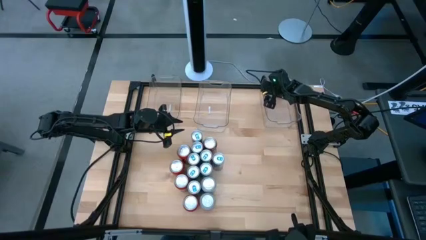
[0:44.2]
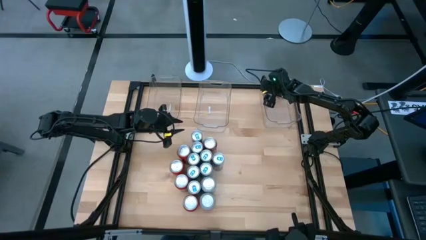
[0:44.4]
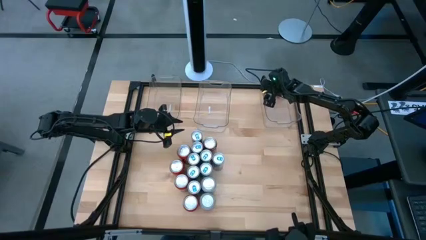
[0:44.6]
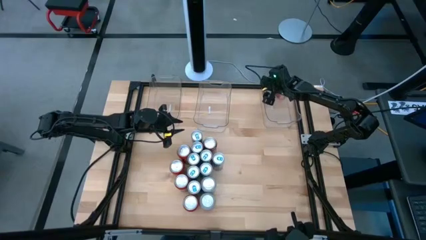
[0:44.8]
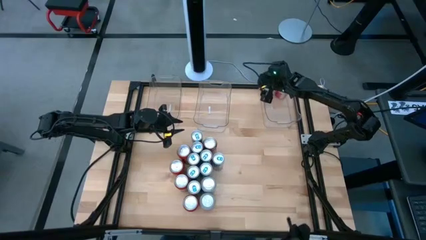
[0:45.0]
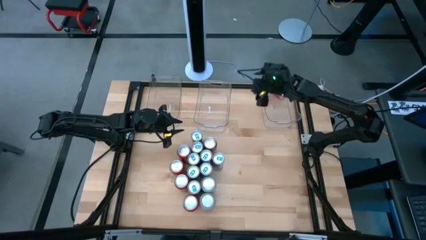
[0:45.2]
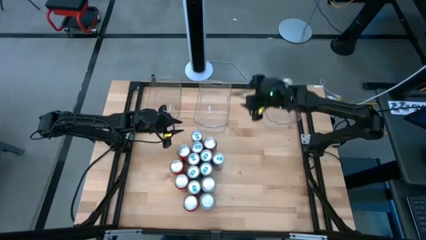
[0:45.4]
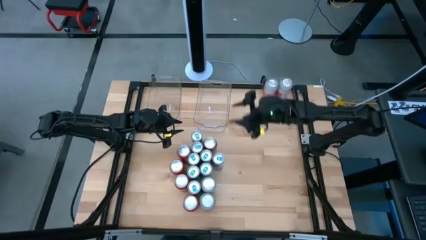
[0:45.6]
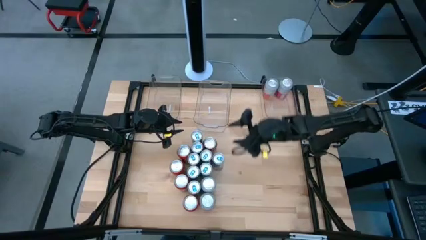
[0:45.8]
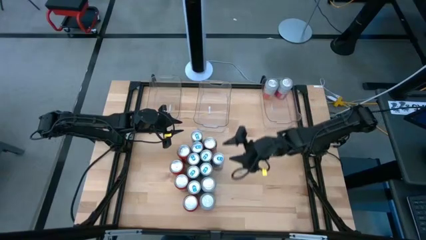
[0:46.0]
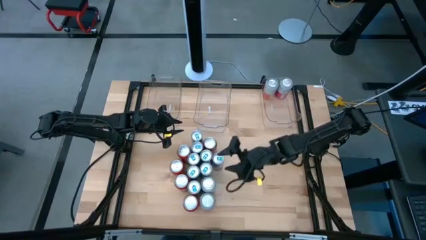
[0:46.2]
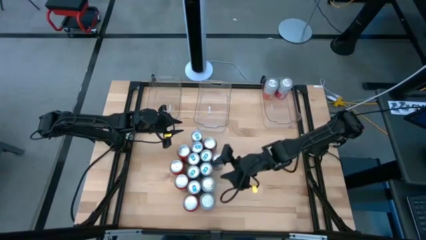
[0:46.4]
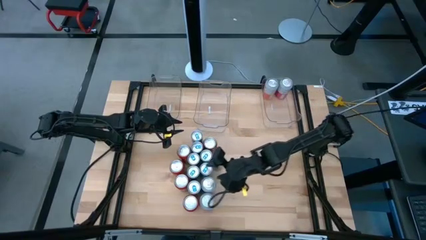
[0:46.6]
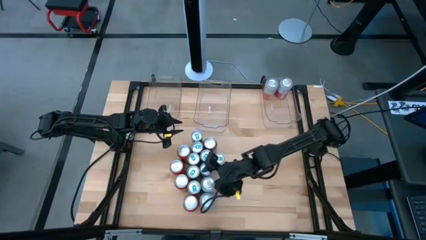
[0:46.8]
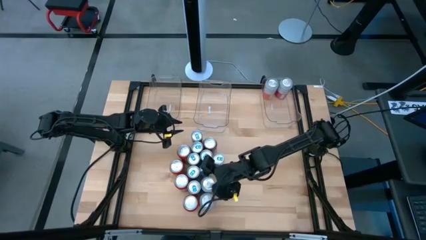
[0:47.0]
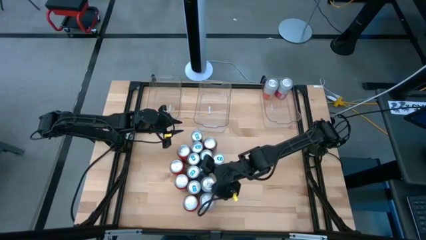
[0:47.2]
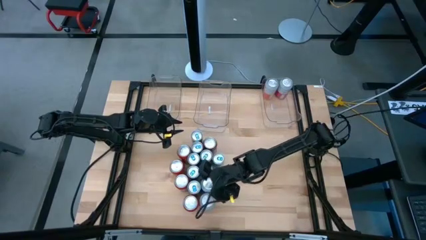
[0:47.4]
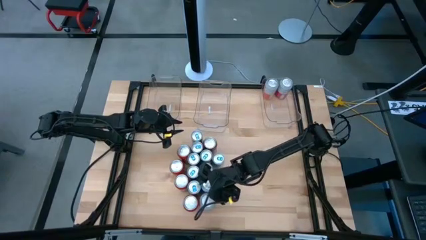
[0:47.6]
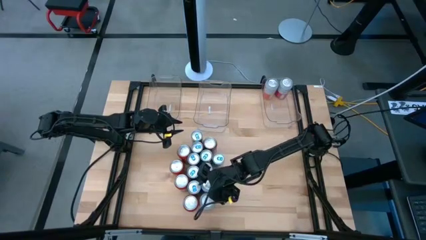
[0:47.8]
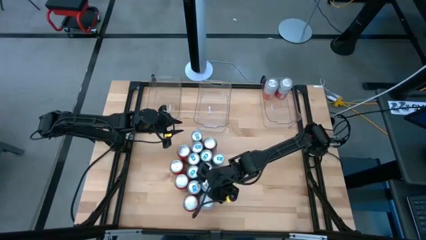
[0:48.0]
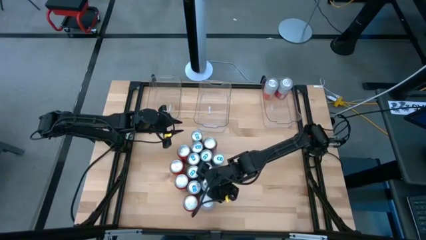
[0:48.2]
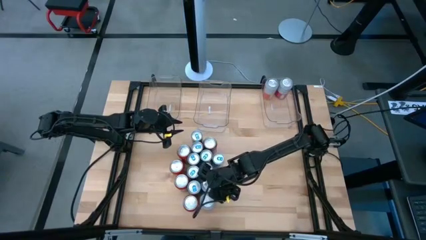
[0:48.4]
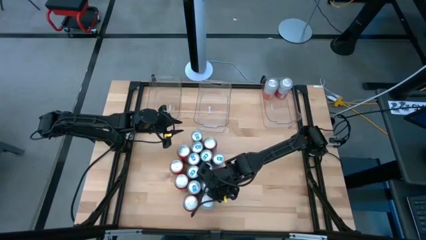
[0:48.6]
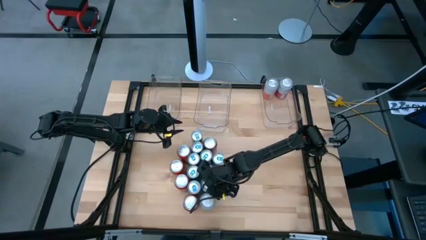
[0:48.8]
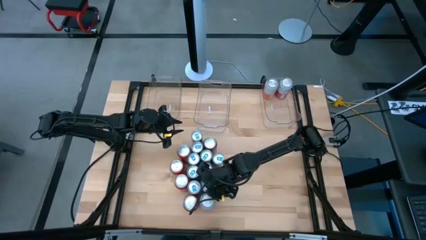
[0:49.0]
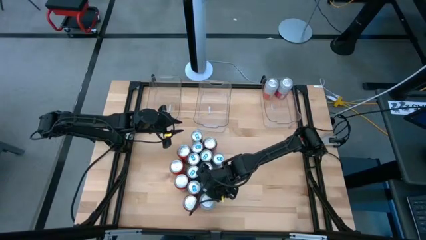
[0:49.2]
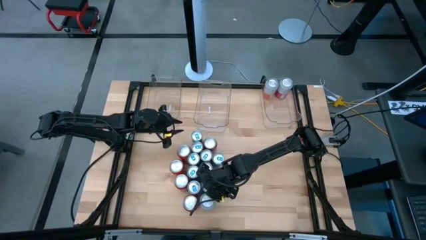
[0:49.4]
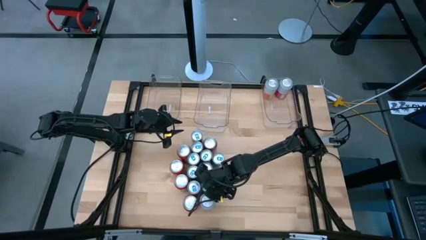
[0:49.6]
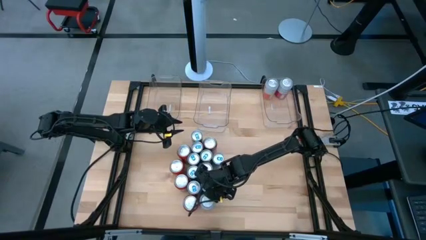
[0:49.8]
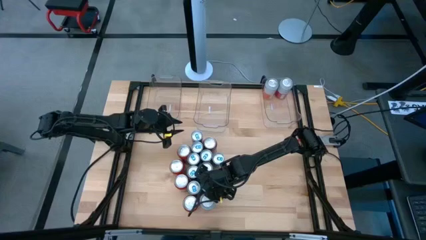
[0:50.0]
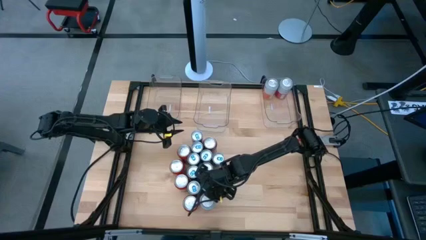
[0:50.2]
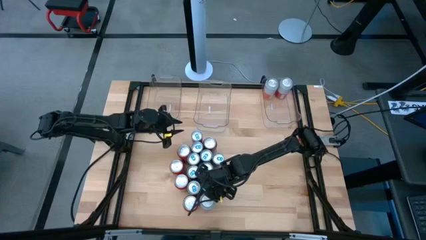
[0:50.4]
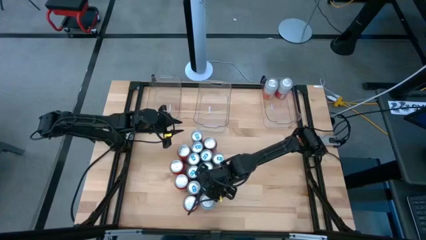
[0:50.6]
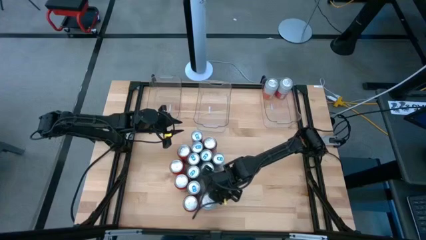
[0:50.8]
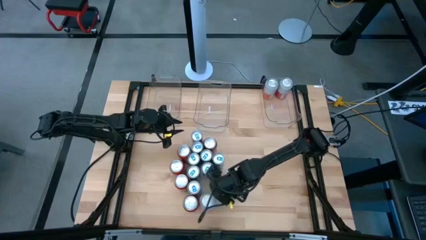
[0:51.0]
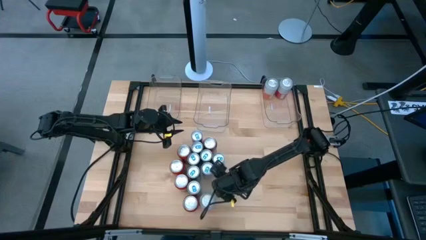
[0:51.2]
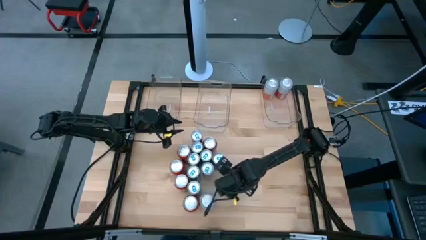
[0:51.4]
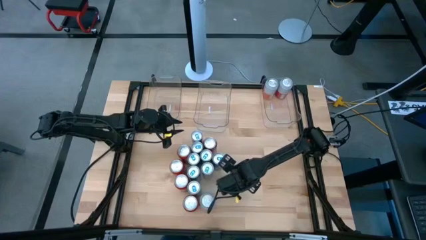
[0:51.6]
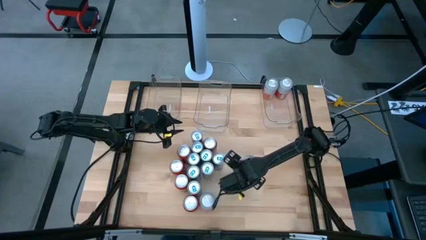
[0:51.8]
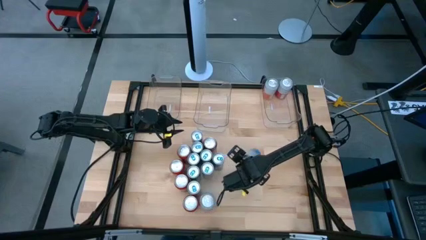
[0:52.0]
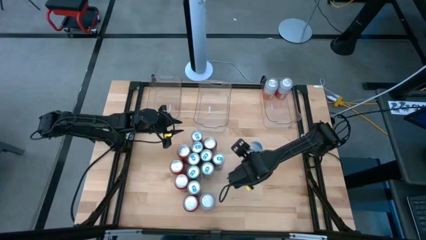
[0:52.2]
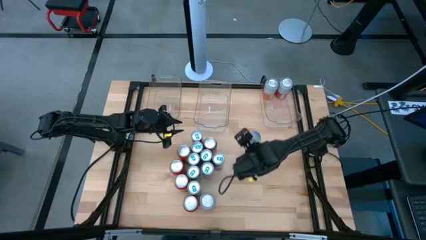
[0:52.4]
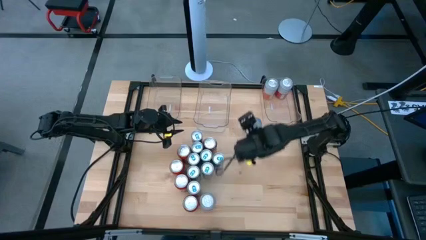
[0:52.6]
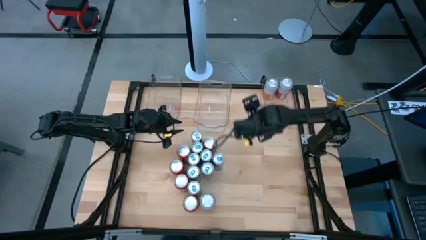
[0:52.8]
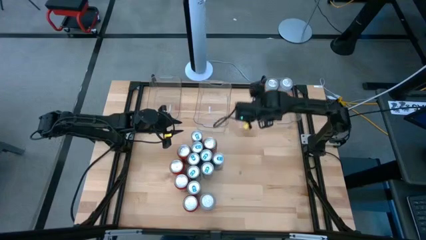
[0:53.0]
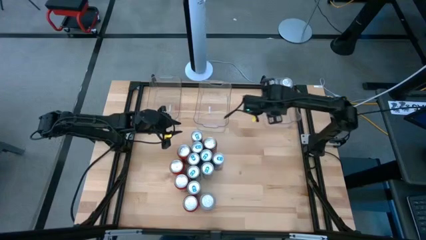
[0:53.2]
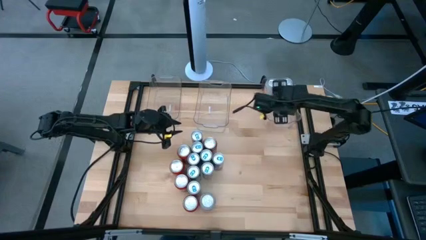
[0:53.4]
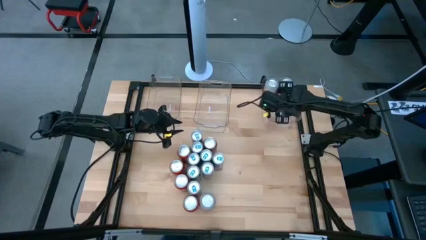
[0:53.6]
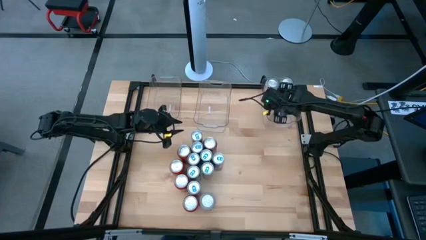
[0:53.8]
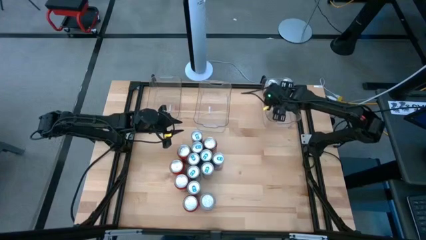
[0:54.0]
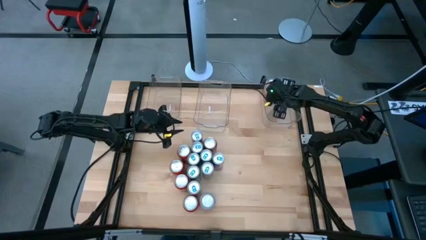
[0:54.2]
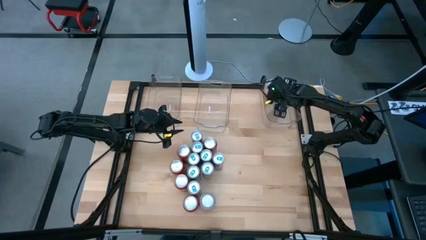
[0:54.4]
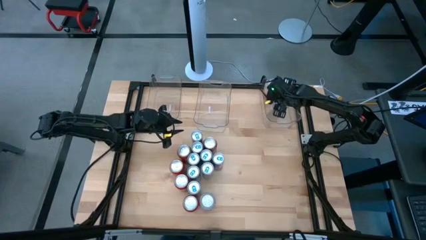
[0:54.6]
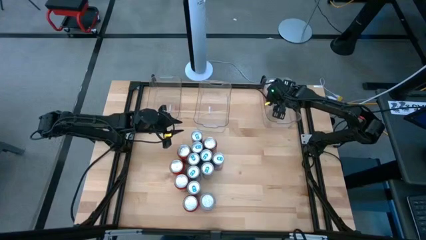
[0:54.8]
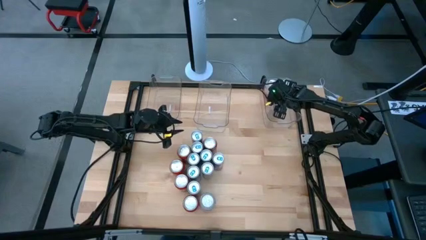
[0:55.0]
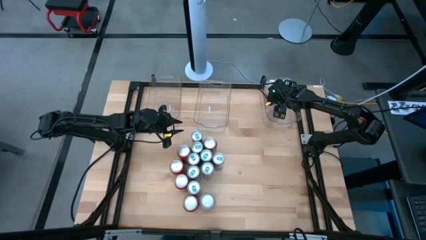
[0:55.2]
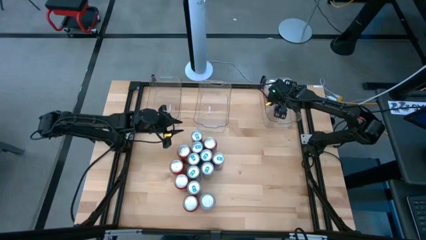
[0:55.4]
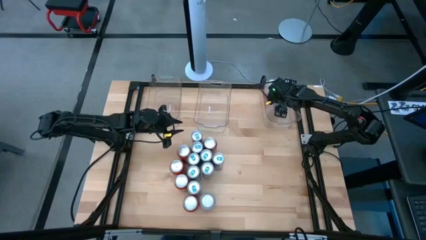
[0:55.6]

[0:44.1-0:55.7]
Task: Sort soda cans
Put the blue-white soda can into the right transparent bin

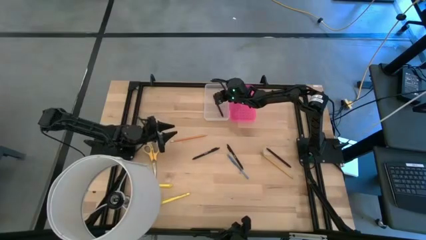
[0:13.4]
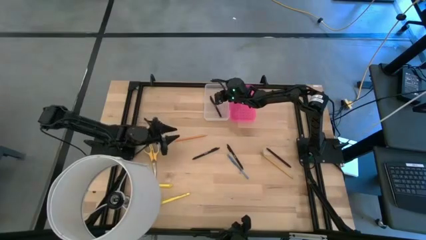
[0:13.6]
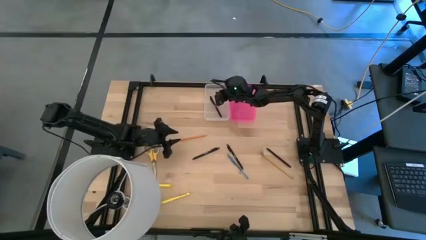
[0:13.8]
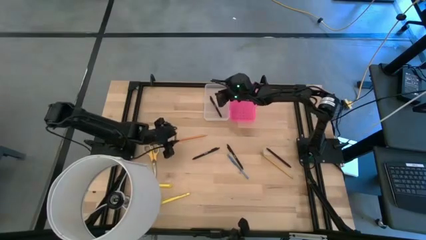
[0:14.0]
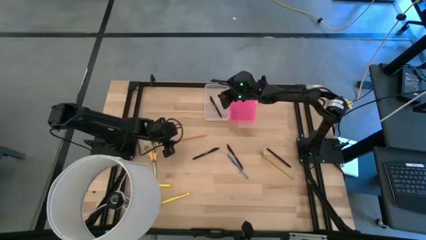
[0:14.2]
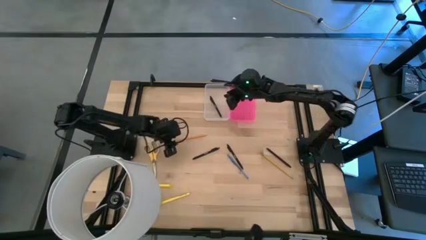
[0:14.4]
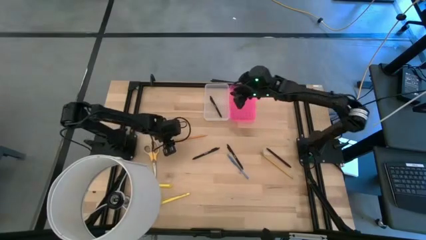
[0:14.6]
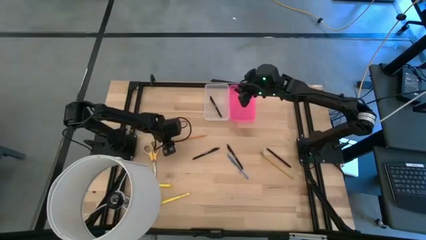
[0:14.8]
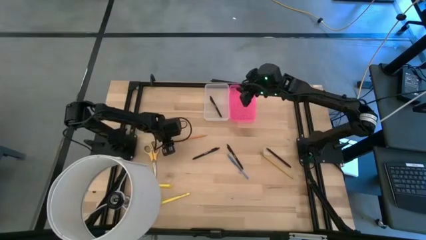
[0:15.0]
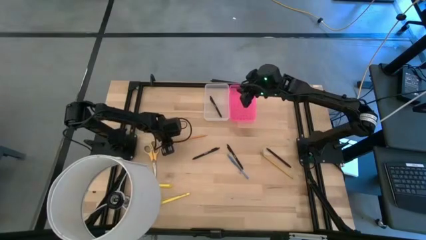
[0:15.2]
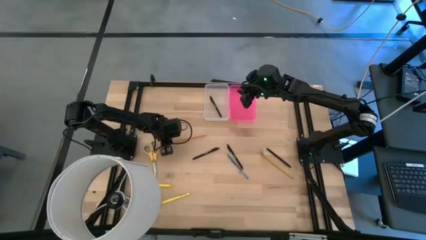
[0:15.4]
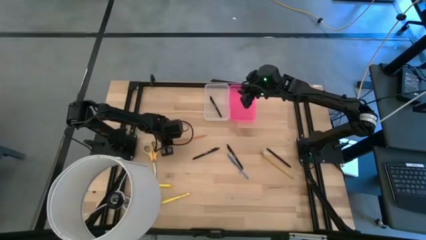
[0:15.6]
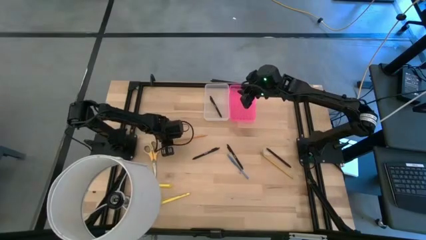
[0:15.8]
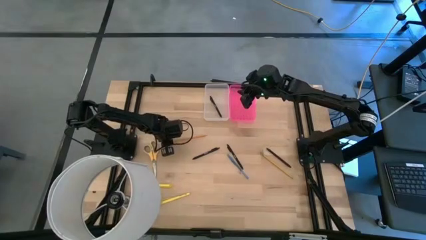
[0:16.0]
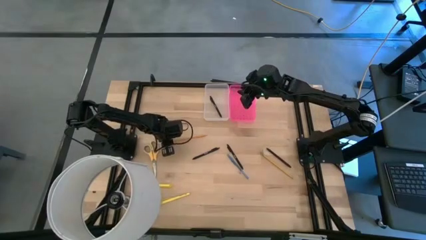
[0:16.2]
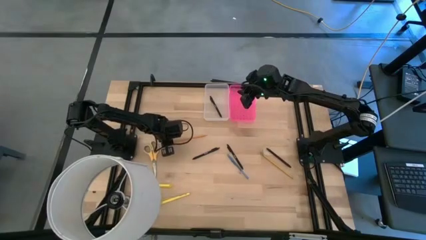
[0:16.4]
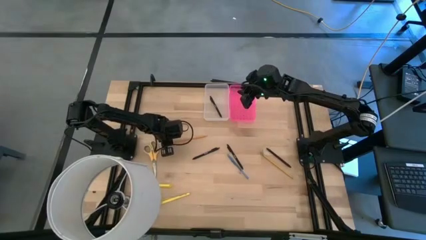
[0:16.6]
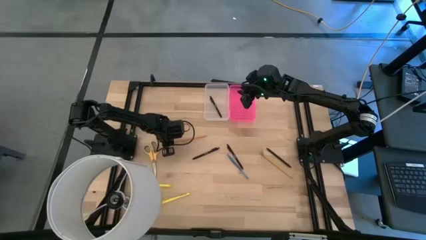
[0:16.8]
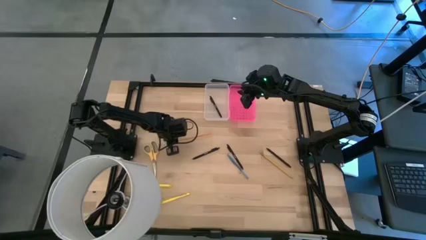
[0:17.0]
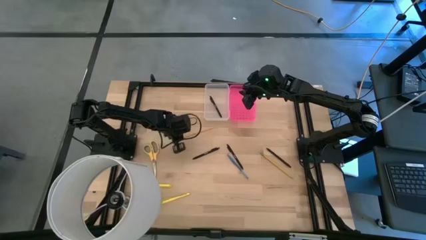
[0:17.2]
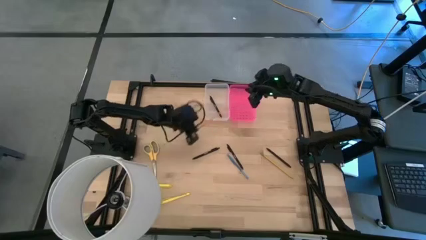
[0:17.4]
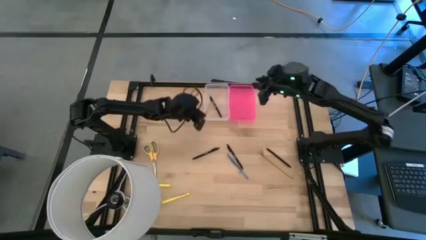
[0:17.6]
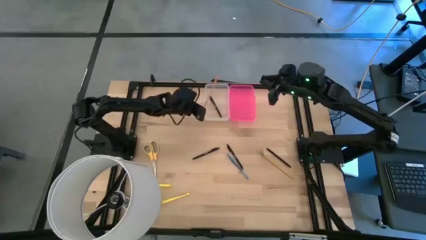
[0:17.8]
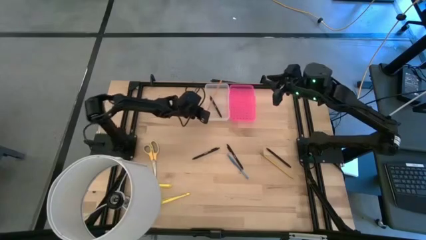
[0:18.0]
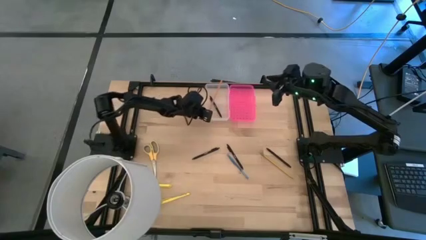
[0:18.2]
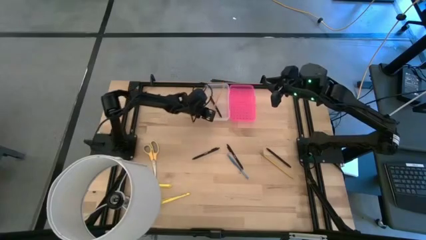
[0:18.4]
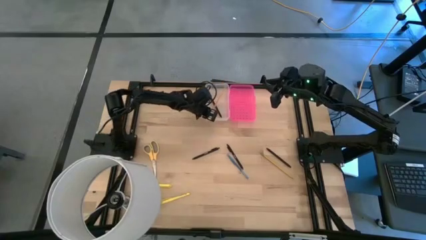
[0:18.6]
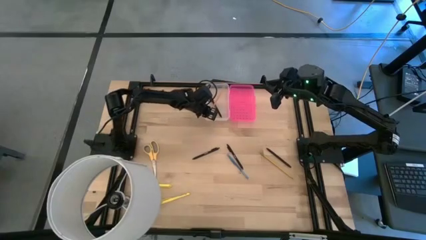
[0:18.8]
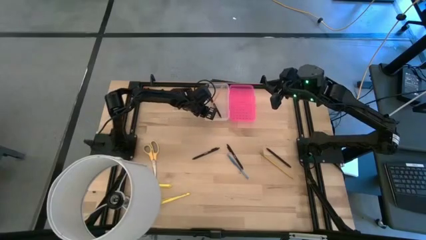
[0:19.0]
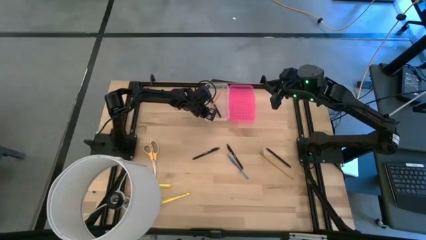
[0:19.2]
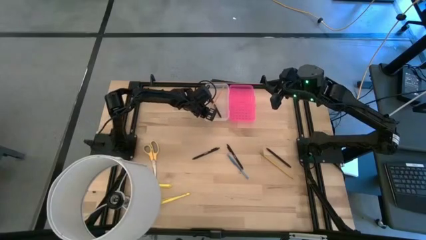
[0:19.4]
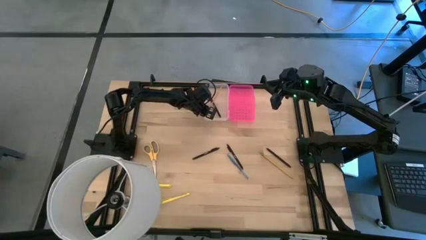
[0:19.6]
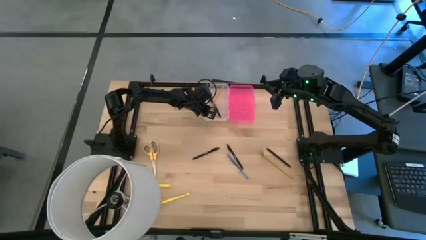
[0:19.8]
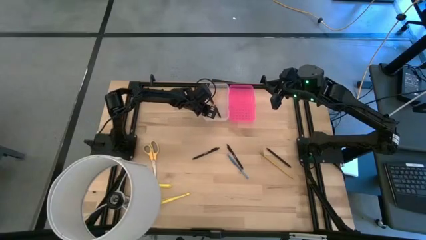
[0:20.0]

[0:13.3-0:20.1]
Task: Pick & place school supplies into a supply box
Put the orange pencil into the transparent supply box
